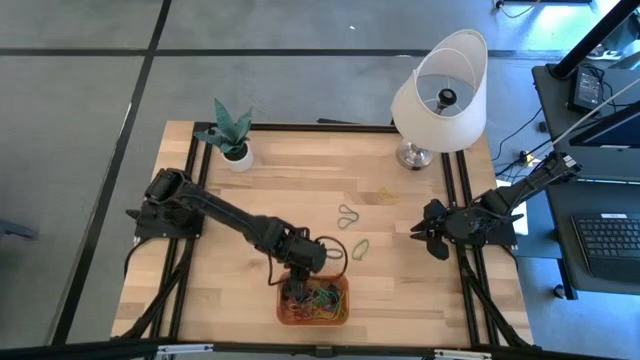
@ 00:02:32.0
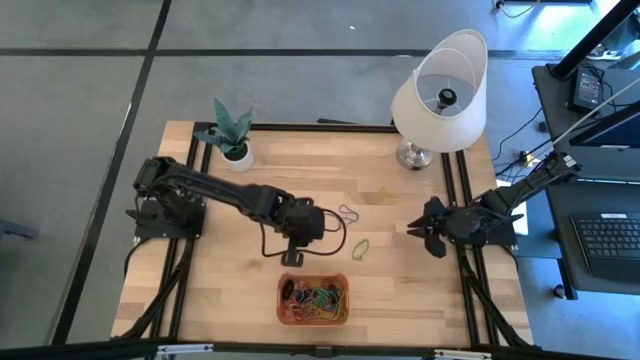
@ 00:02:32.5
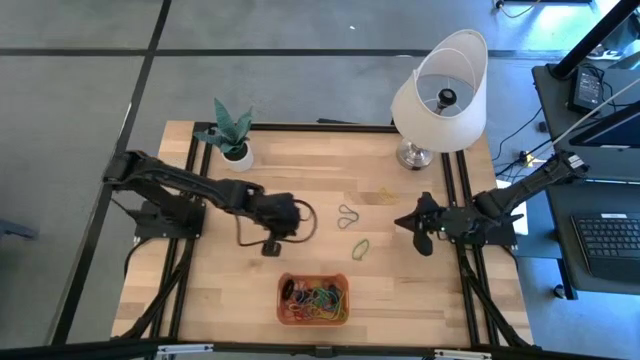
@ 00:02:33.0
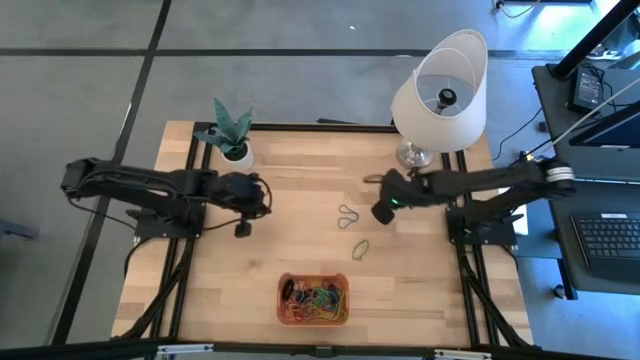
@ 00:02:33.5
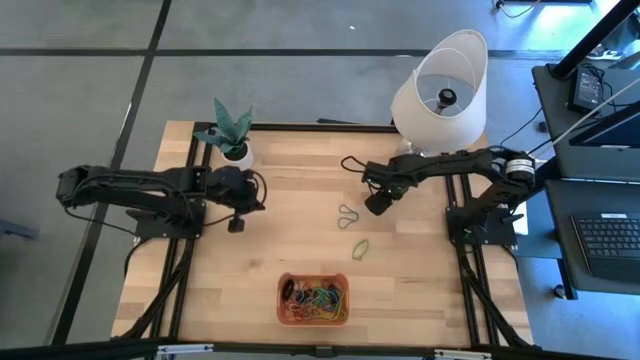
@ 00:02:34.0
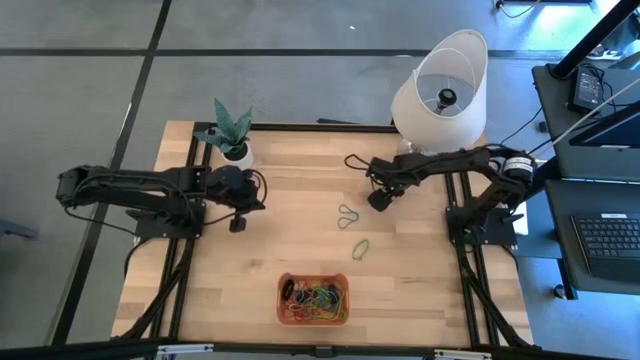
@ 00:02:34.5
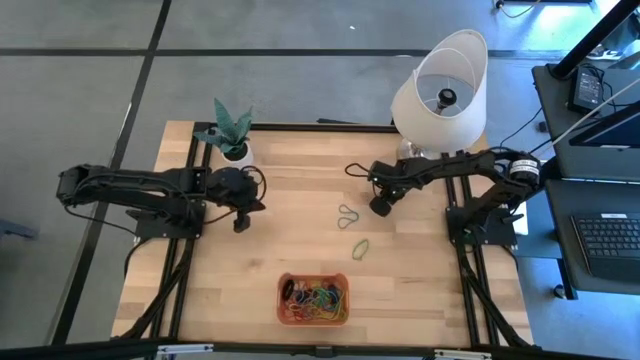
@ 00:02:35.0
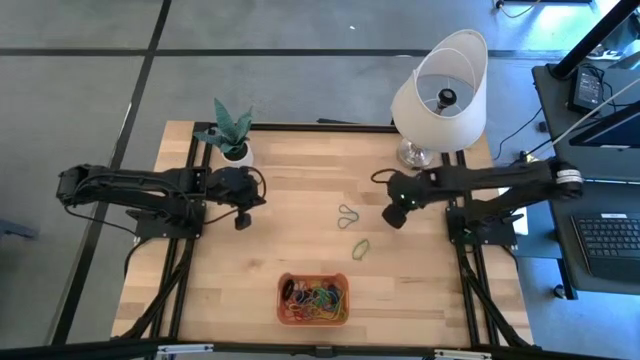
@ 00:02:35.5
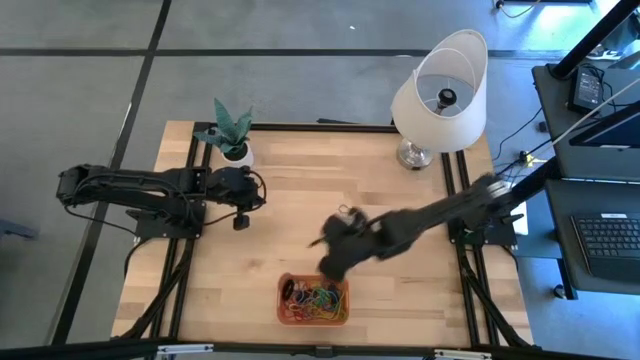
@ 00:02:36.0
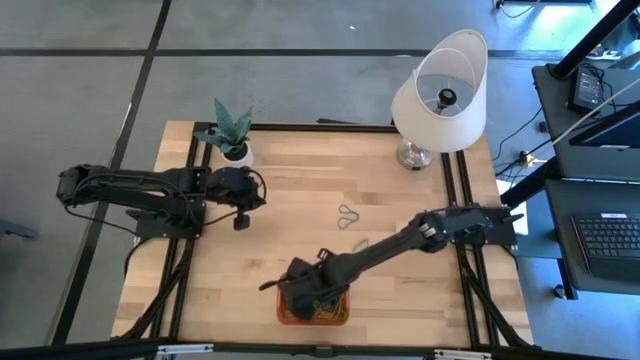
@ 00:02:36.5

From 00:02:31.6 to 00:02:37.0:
Task: Pick and place rubber bands into bin
Put the yellow rubber band into the bin

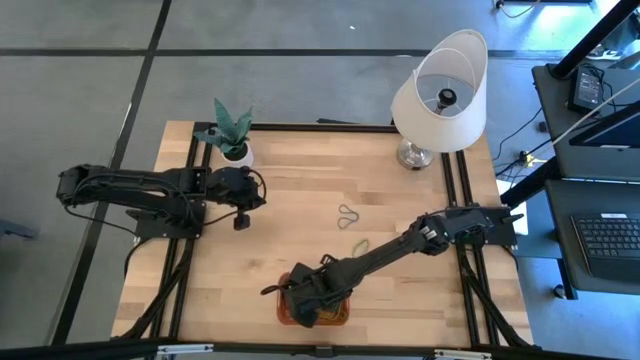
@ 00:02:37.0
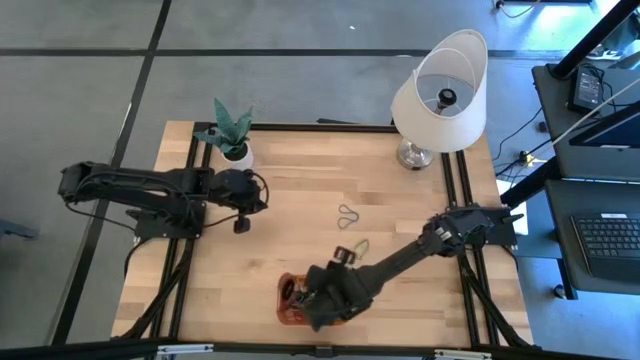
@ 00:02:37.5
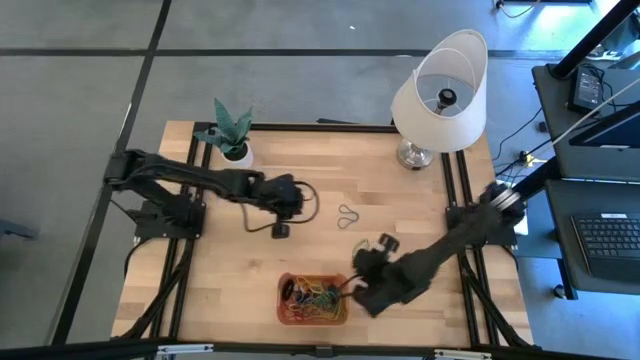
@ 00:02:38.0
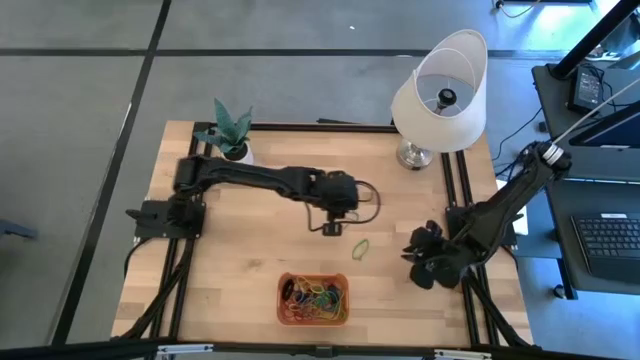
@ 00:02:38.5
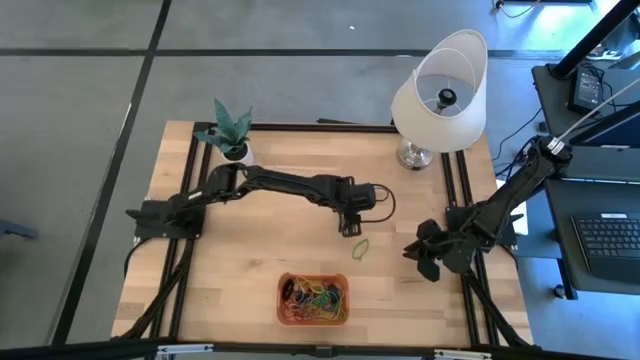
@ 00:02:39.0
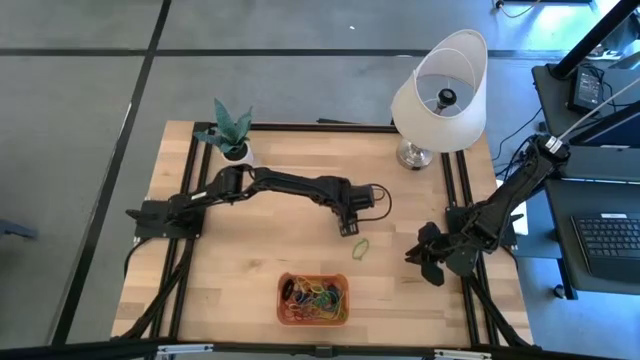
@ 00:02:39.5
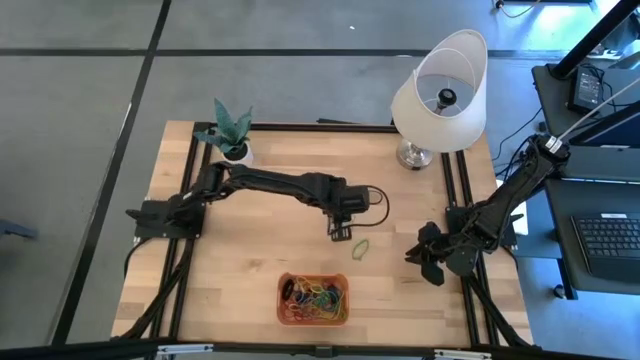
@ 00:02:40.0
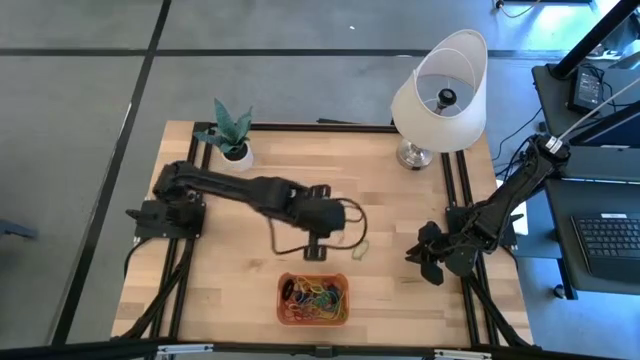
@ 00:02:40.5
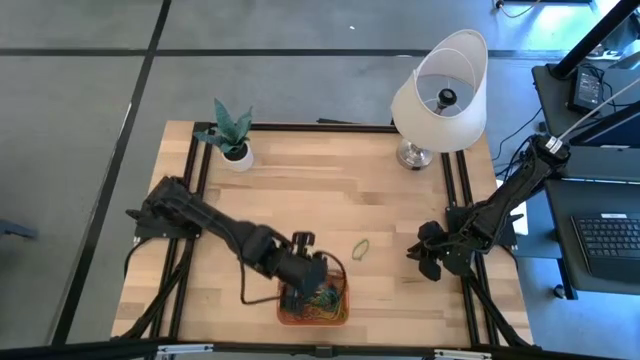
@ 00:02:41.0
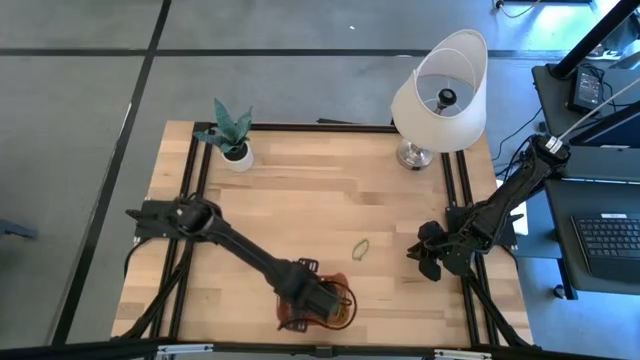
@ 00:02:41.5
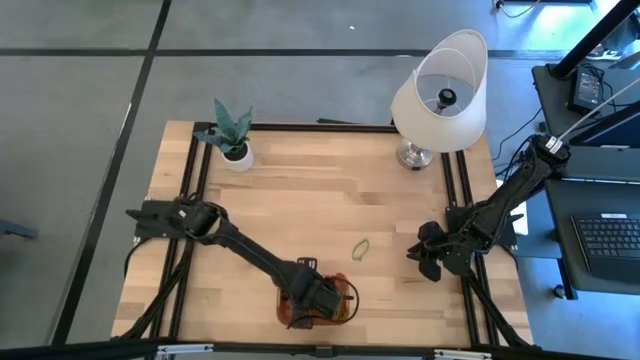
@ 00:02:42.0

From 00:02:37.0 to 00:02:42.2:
Put the blue rubber band into the bin

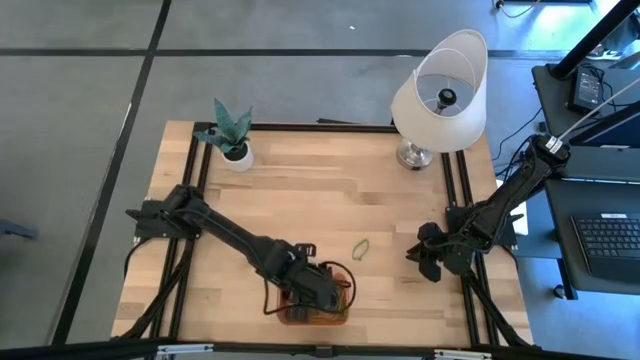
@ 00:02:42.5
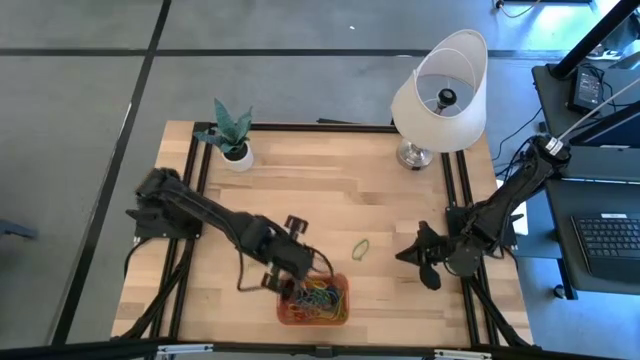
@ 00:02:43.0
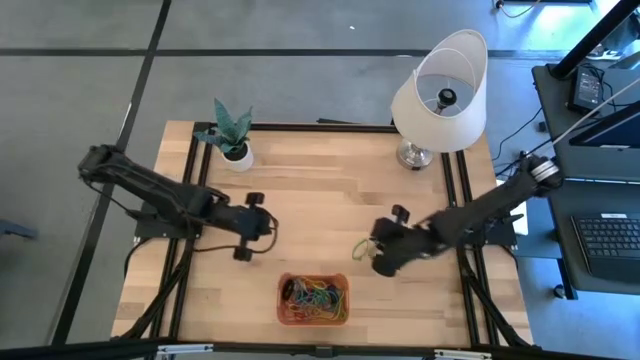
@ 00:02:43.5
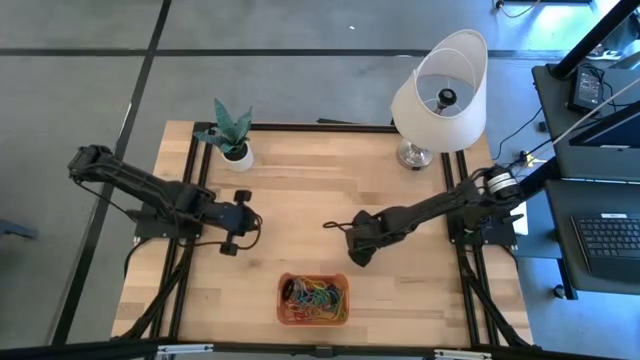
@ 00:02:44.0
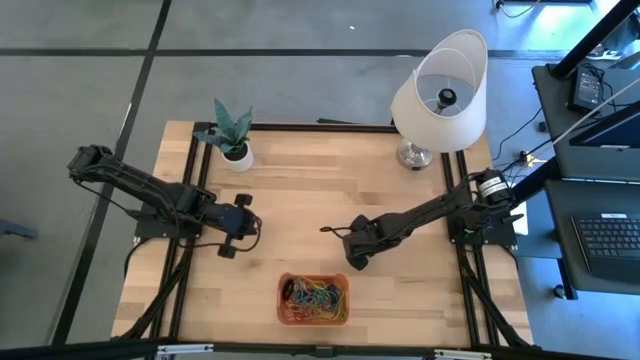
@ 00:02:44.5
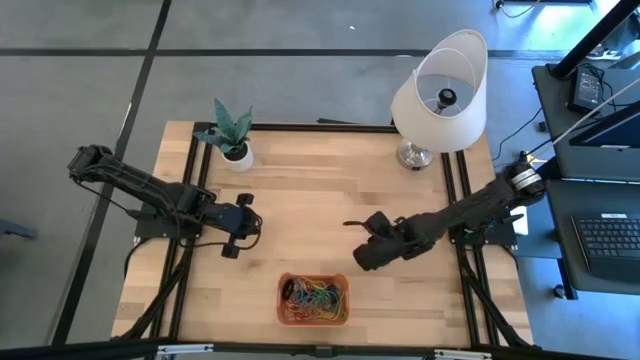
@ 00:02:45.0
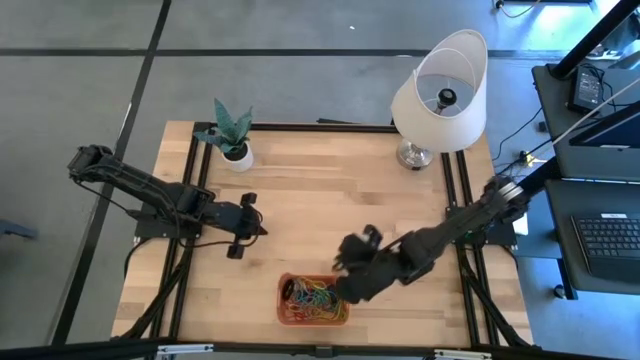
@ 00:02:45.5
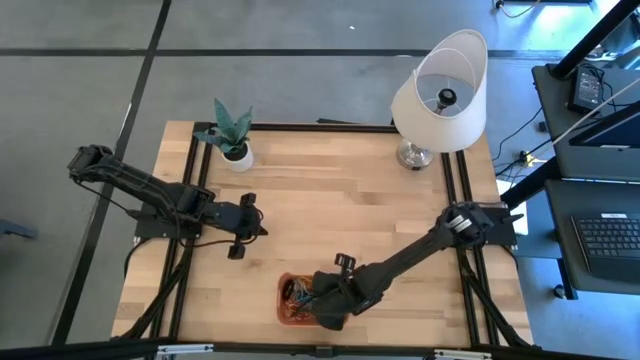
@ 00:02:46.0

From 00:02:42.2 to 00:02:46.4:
Put the green rubber band into the bin

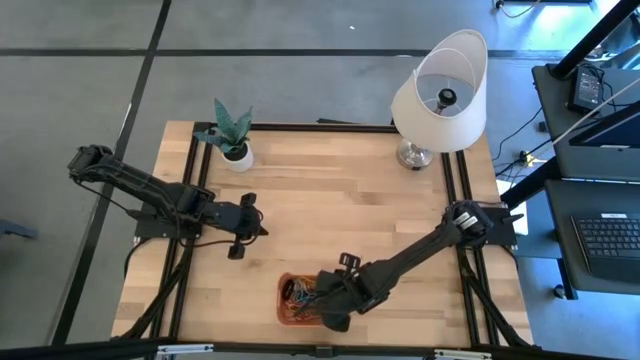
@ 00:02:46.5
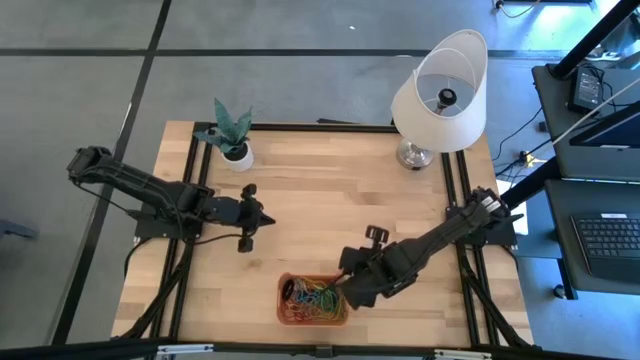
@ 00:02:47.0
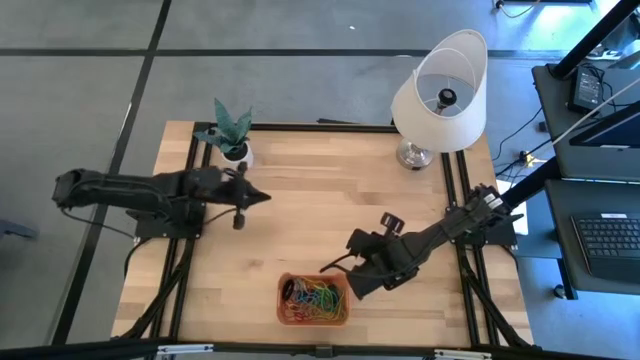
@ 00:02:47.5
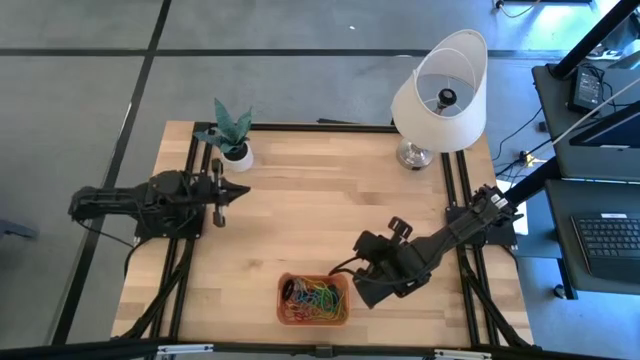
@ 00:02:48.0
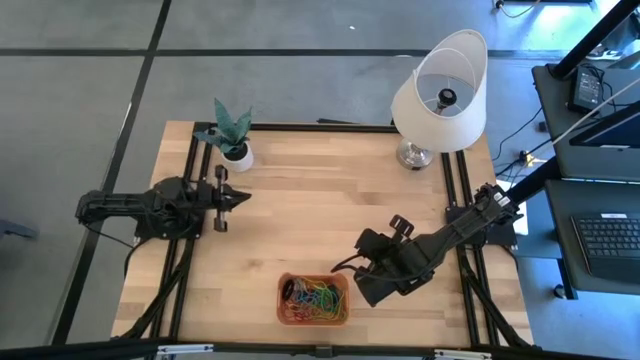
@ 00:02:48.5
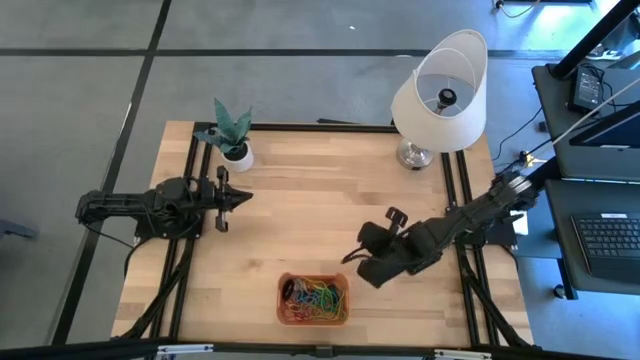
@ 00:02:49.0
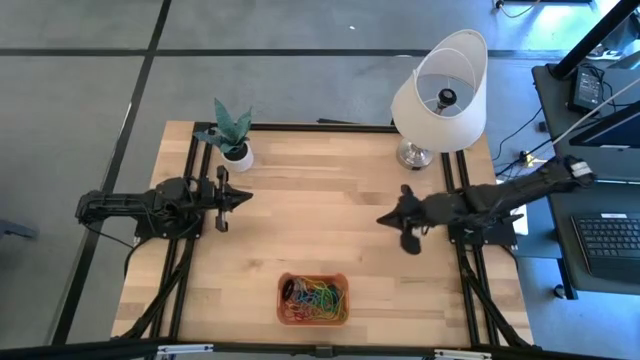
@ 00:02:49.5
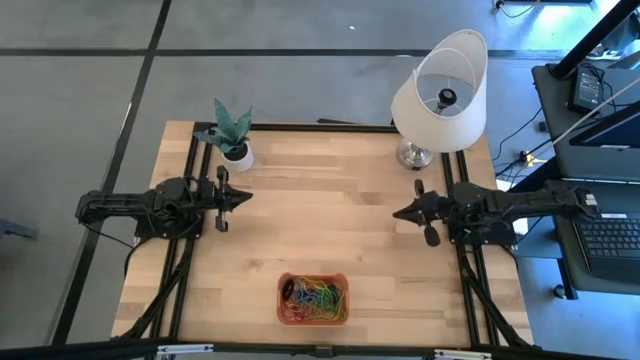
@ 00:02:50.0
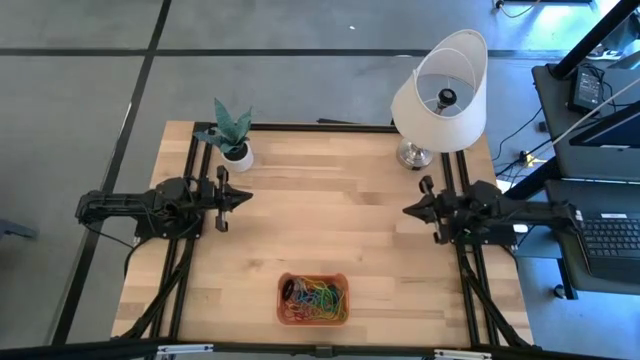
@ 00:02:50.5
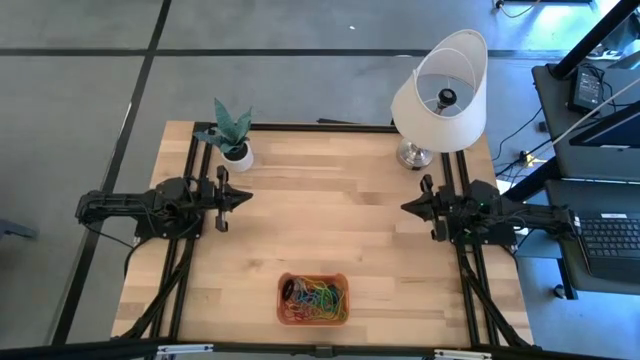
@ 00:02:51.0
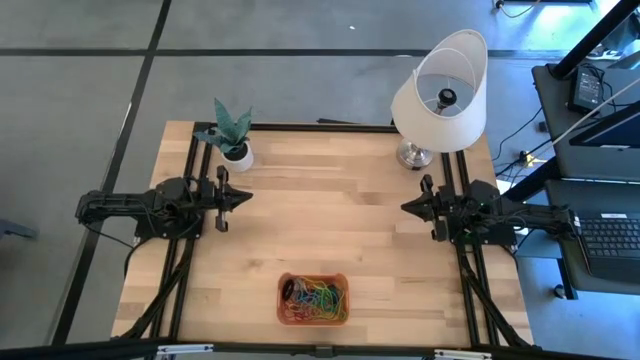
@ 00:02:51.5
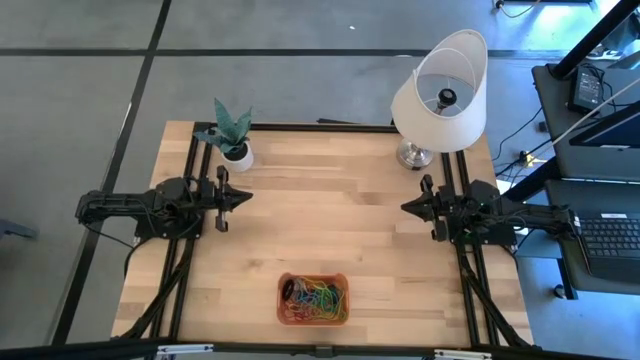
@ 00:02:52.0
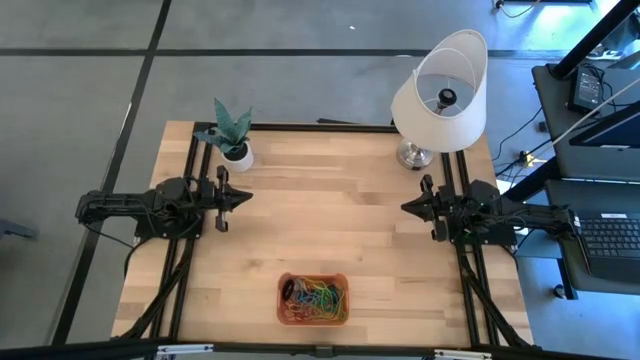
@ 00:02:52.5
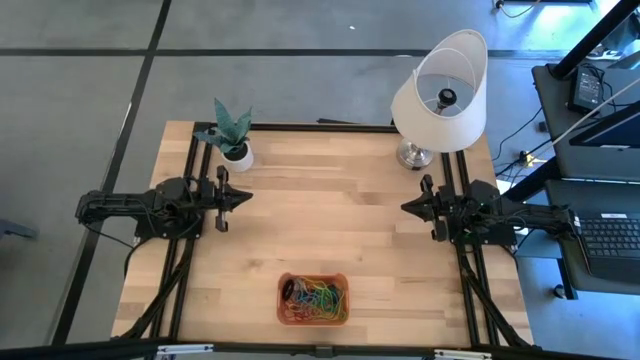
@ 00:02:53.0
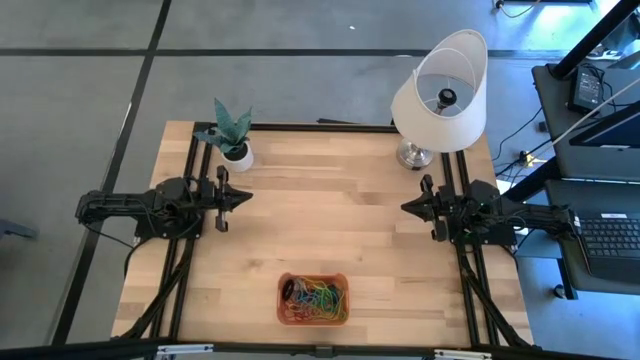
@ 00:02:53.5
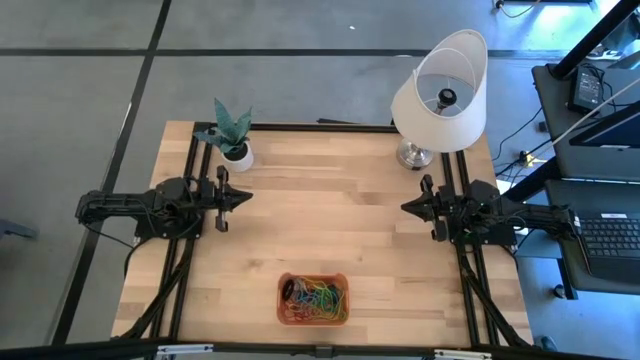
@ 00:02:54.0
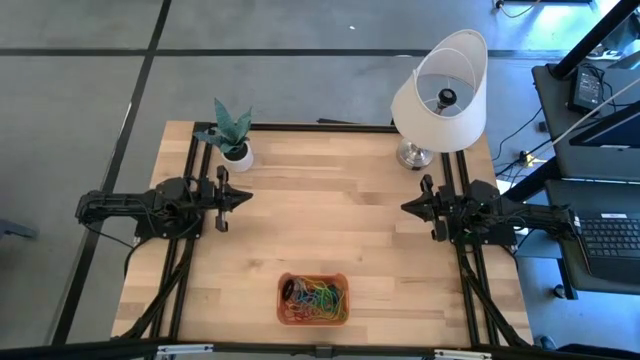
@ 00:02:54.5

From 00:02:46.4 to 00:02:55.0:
Return to Home Position
